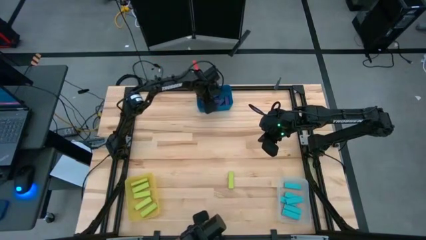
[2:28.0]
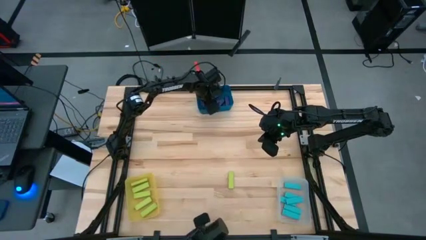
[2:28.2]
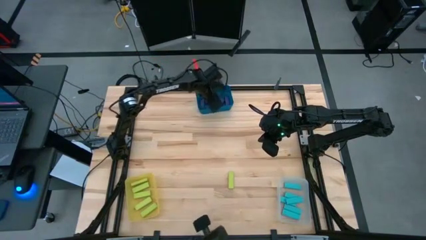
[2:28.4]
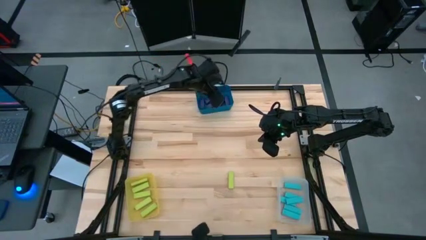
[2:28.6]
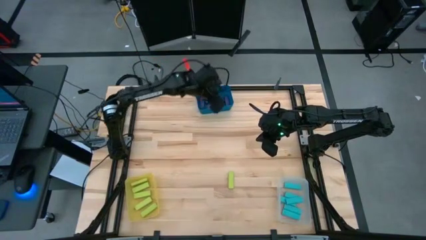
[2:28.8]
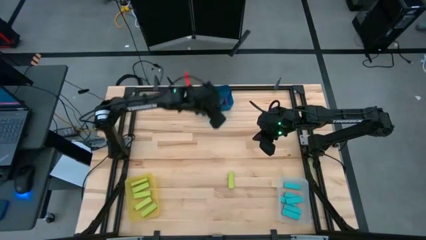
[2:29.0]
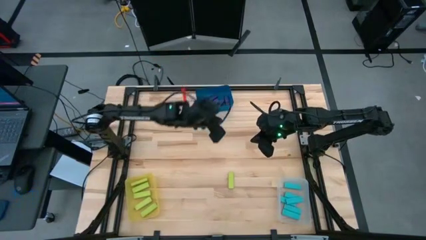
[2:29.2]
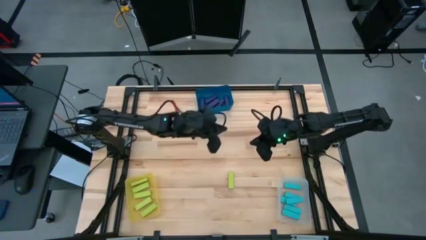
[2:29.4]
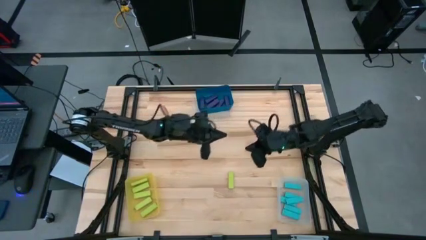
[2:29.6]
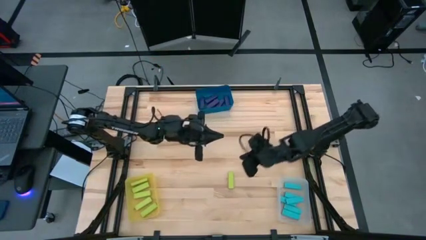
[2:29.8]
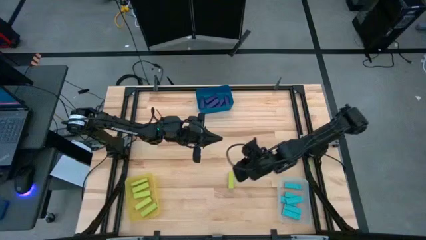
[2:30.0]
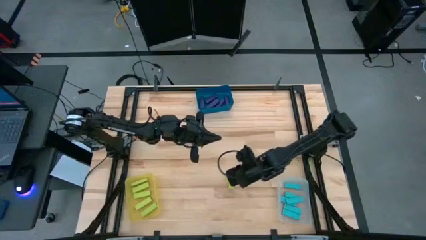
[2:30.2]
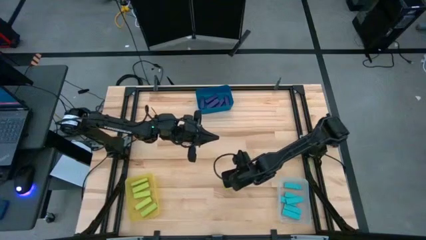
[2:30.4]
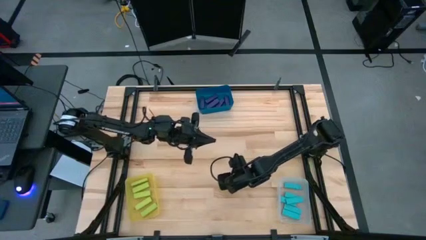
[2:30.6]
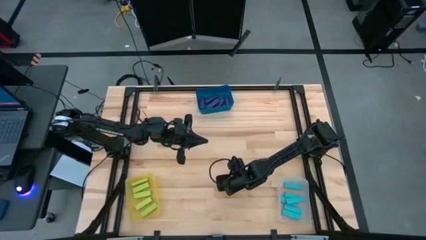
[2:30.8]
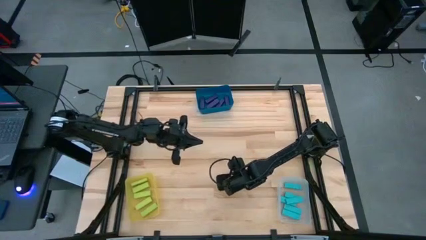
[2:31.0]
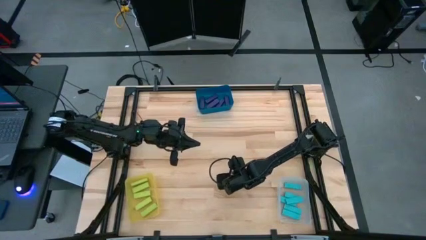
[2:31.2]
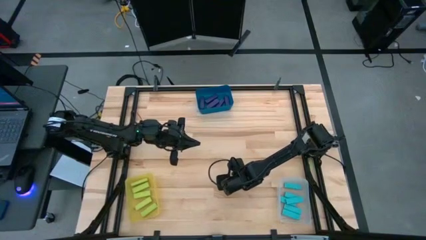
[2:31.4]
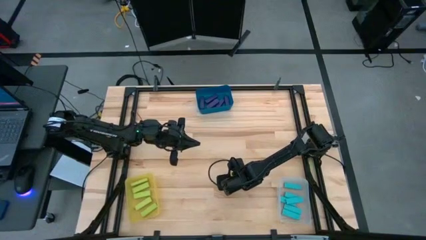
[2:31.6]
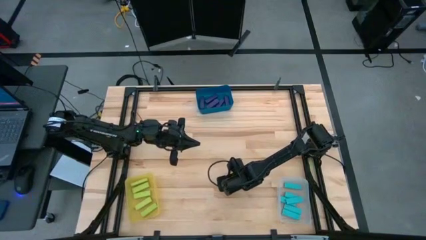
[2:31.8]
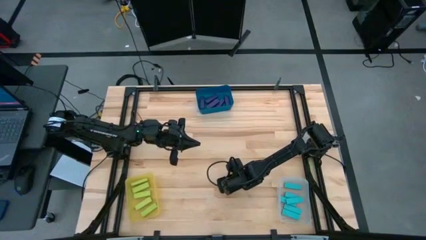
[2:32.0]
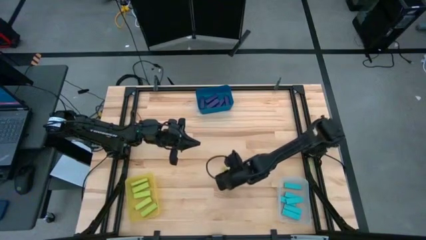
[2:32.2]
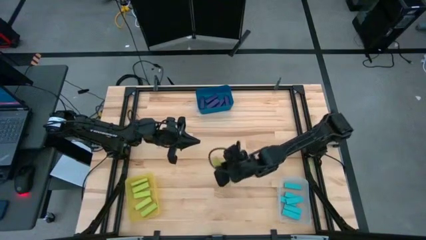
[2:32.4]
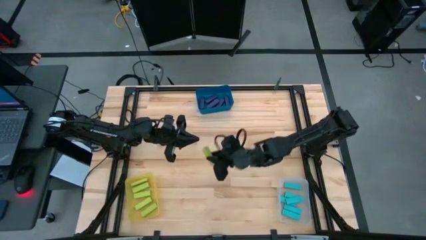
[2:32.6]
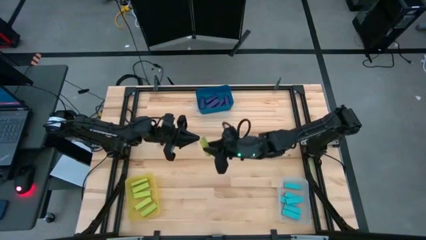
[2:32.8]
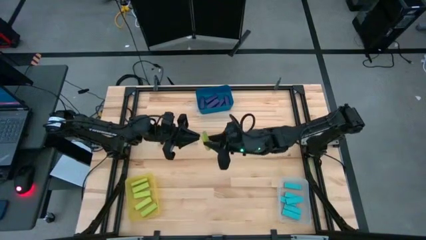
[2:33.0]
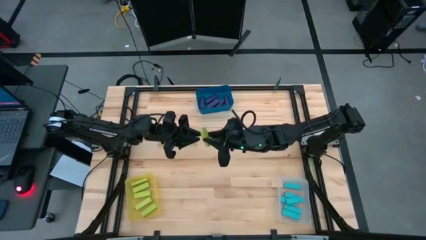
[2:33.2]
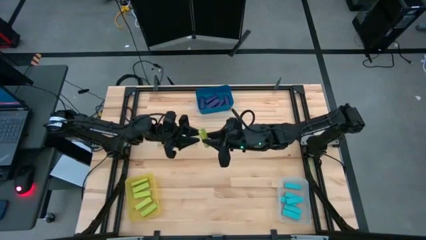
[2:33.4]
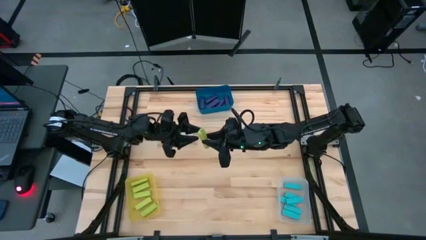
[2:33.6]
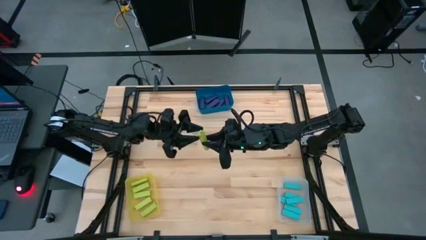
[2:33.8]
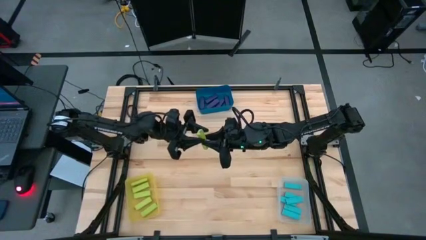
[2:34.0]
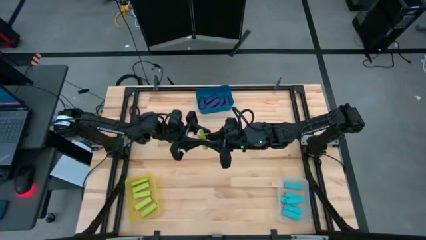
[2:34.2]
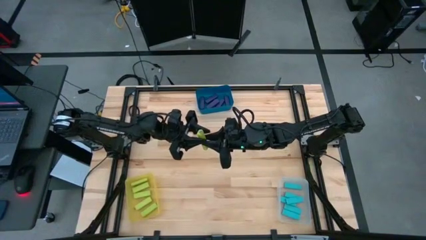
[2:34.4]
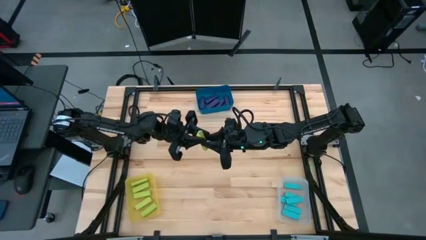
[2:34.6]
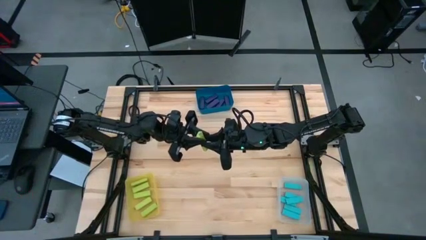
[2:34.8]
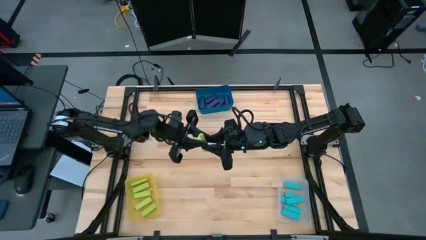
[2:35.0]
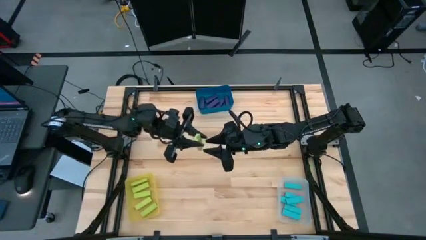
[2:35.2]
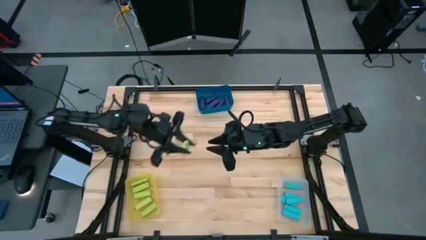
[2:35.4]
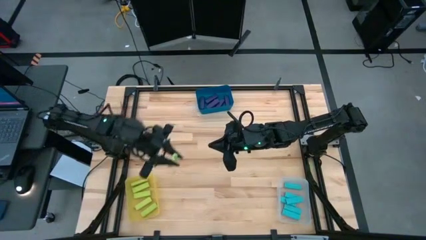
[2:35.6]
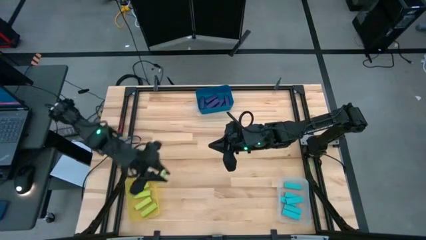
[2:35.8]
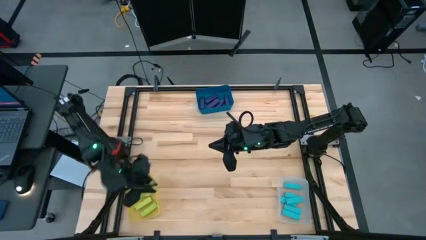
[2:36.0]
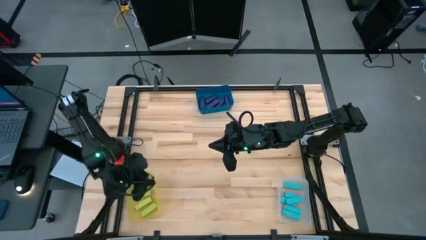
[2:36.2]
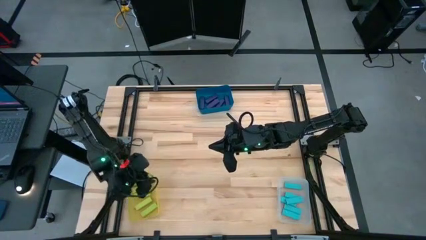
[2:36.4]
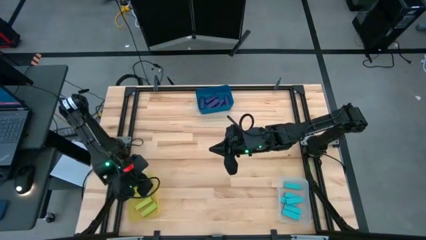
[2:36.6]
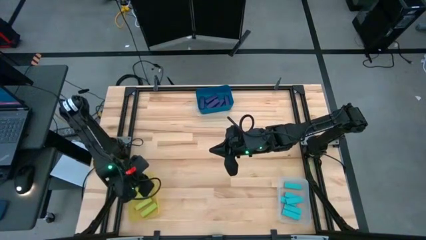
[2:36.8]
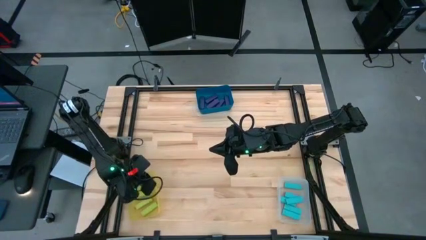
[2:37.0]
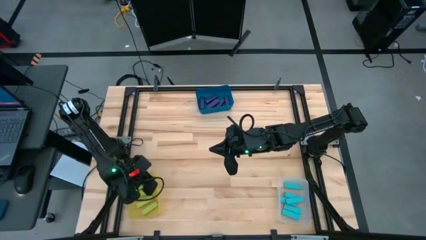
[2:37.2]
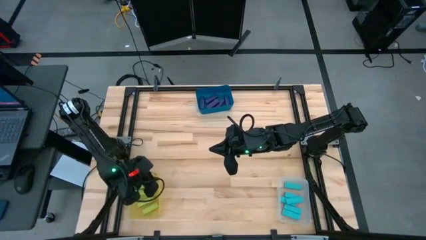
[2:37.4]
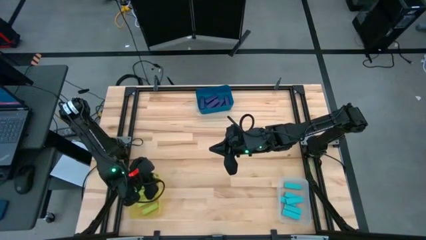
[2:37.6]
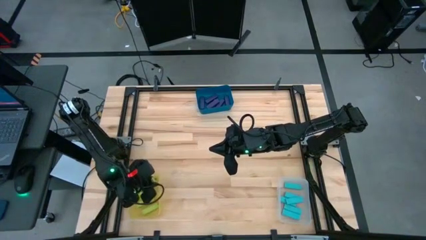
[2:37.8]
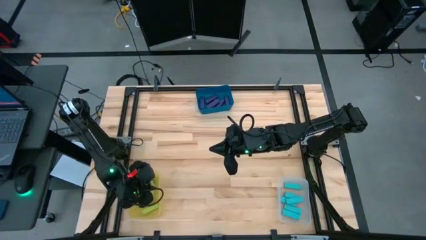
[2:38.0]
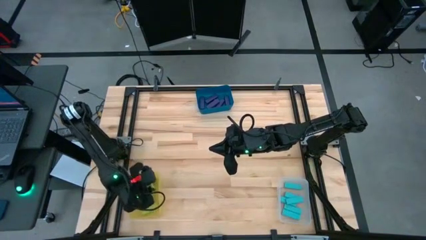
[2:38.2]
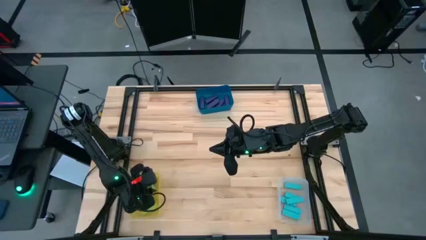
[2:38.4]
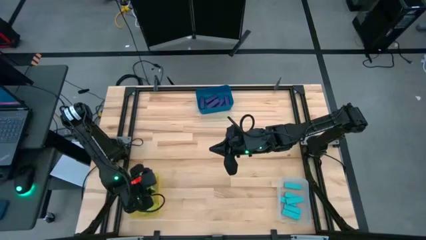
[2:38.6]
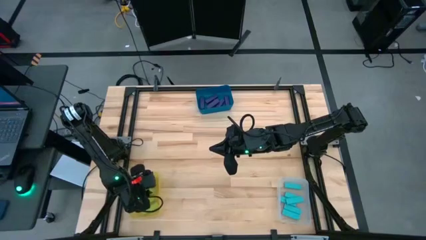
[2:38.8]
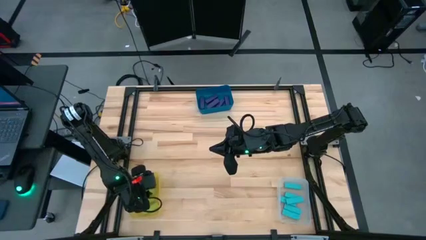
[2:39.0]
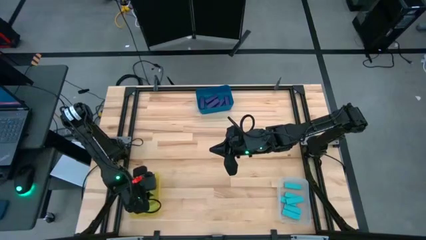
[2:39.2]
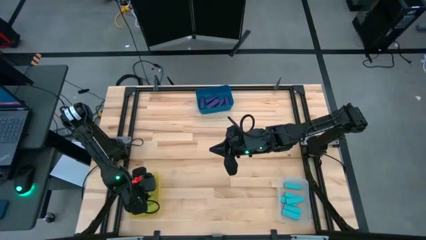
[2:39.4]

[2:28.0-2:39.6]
Task: Sort blocks
Put the yellow green block into the yellow bin

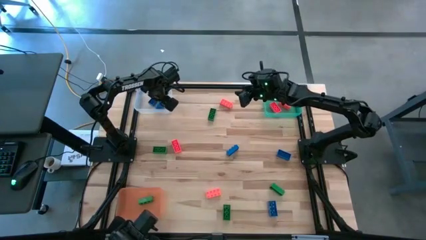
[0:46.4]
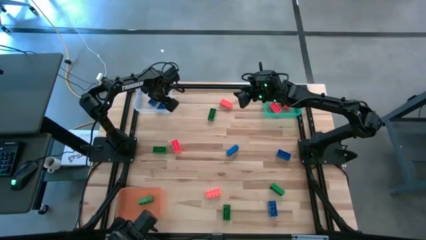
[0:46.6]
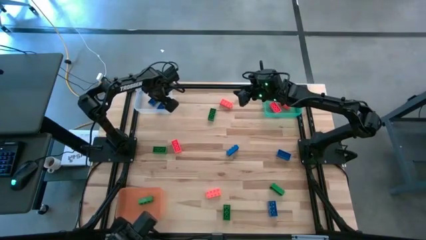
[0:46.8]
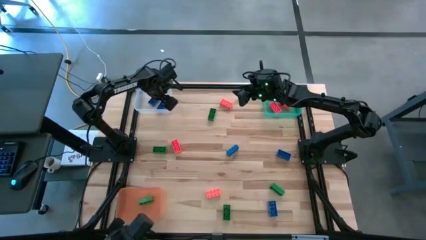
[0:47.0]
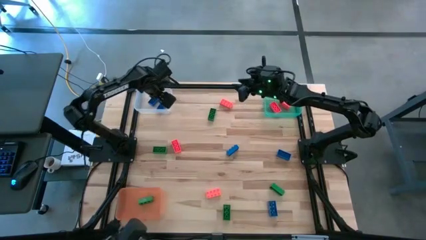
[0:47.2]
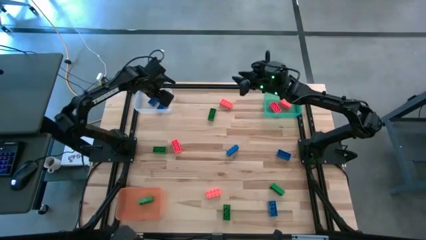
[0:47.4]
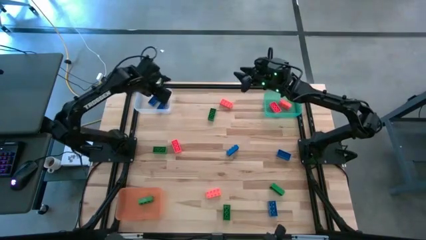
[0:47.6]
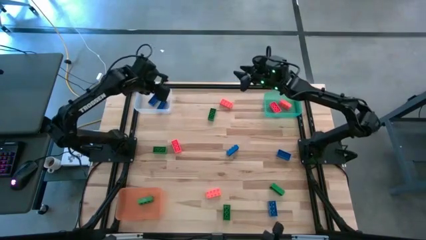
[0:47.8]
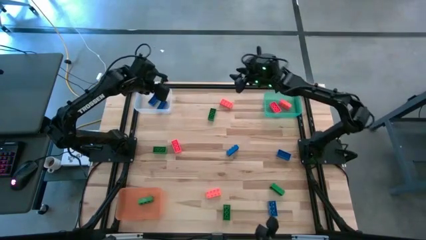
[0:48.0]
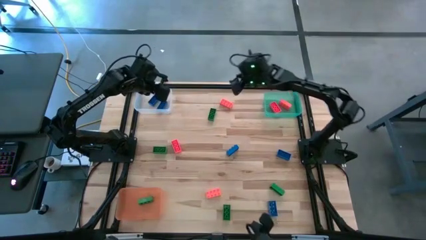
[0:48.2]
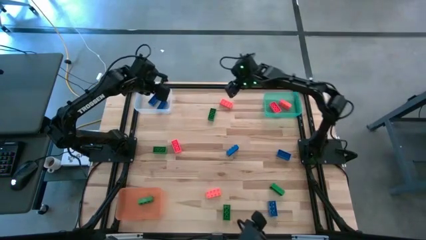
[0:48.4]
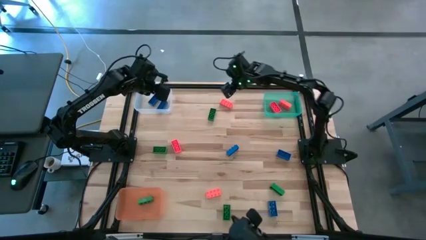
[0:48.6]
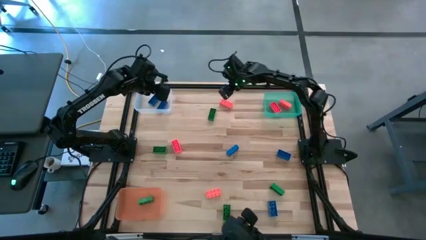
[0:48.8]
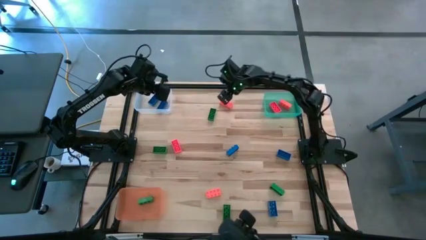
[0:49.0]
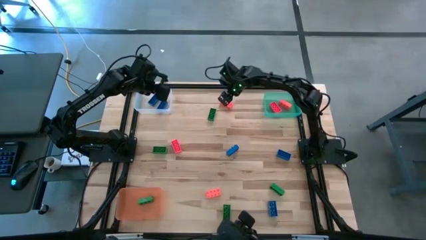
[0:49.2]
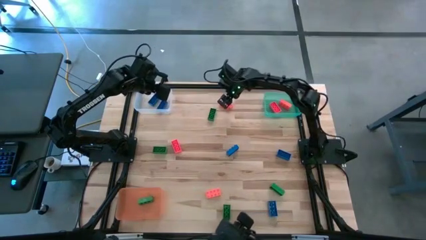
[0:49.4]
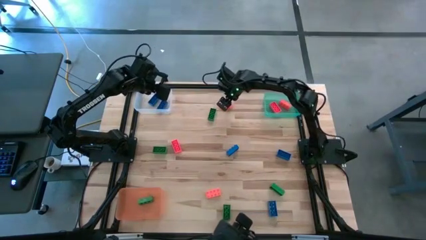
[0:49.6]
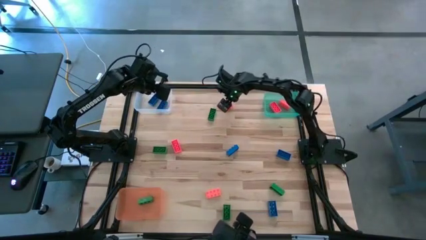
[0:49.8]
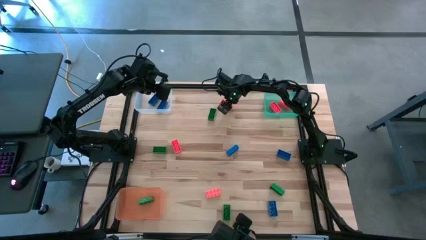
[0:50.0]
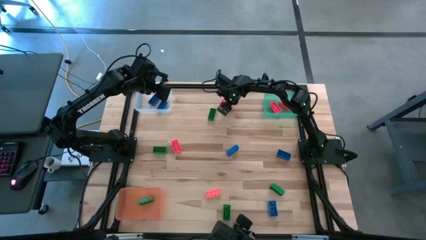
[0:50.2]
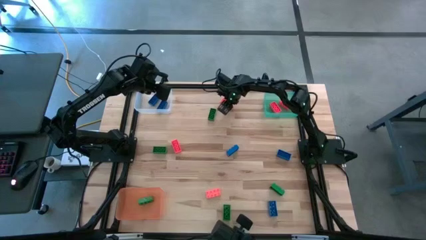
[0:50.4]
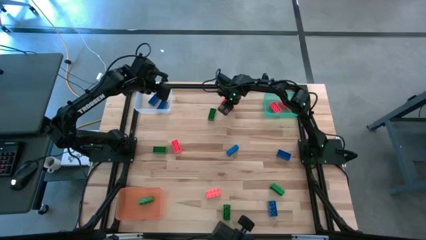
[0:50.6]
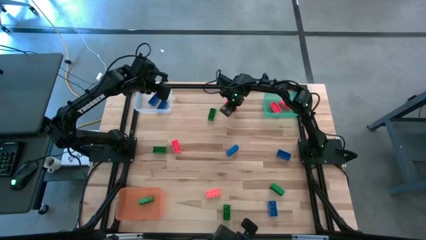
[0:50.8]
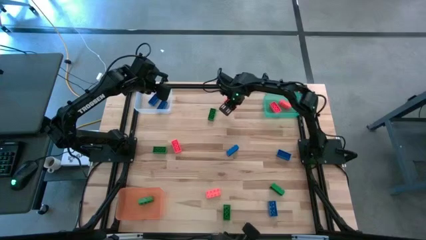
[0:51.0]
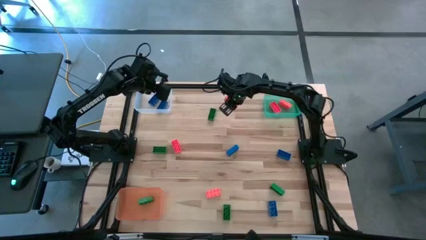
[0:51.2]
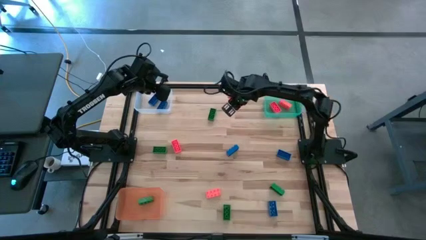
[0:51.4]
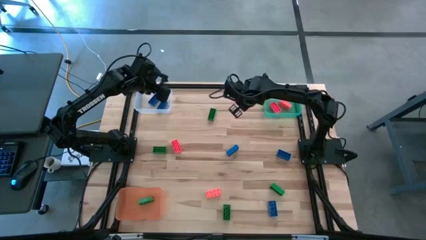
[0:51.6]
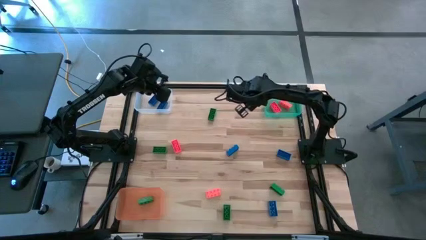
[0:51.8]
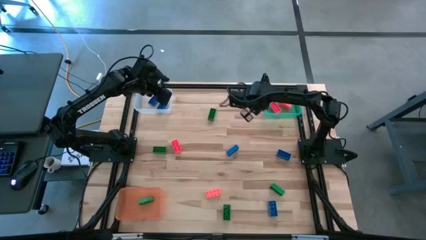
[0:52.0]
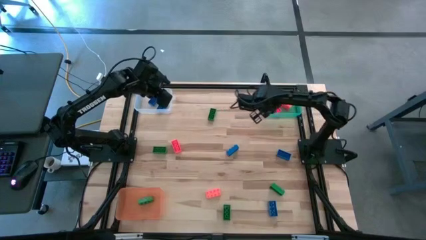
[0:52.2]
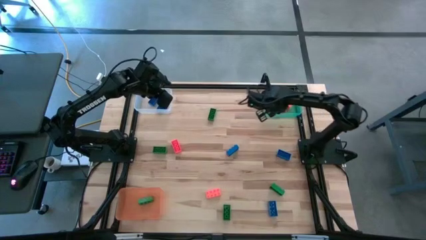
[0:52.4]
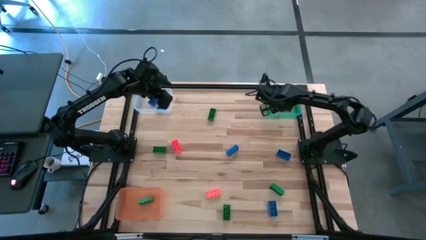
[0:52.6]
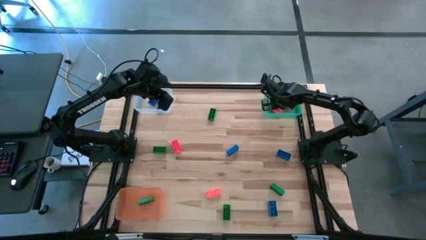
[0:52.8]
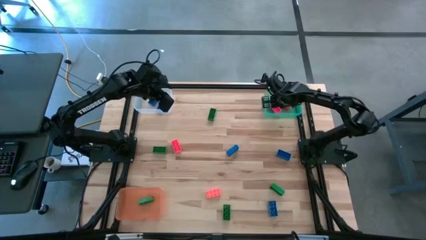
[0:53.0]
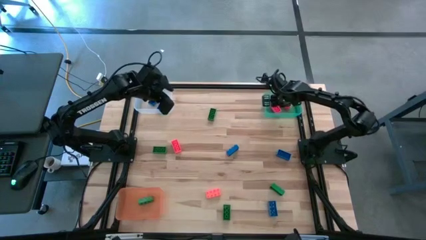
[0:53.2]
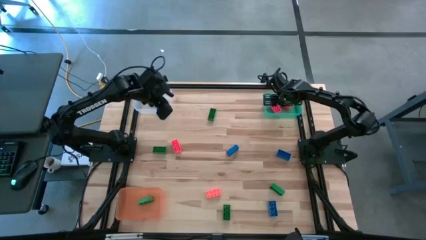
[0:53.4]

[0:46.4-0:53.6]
Task: Sort & place blocks by color
Put the orange game piece into the light blue bin
